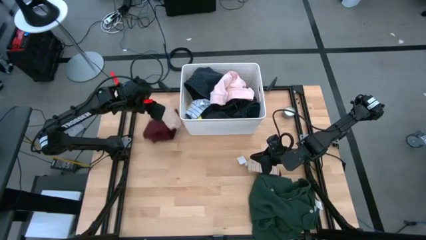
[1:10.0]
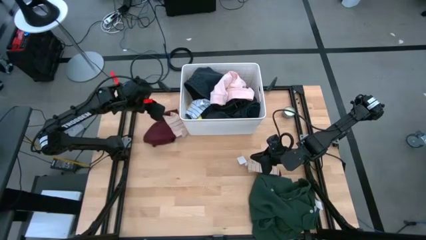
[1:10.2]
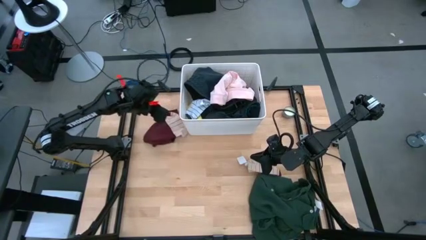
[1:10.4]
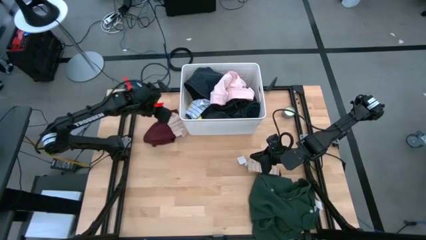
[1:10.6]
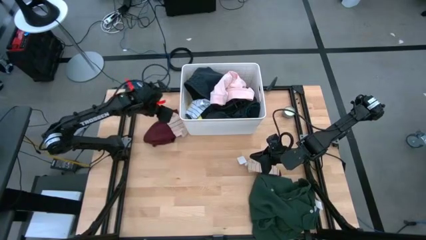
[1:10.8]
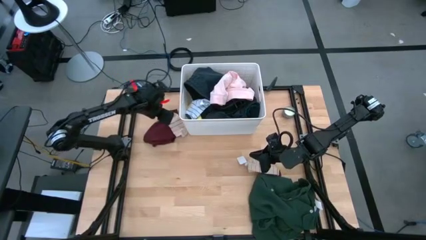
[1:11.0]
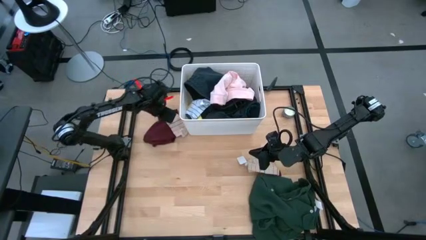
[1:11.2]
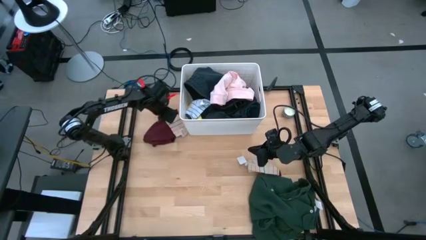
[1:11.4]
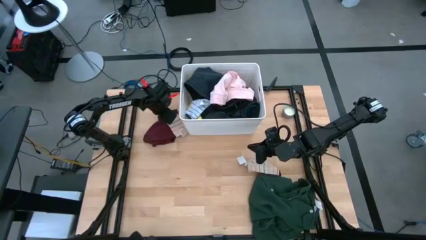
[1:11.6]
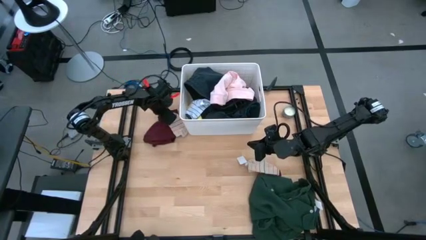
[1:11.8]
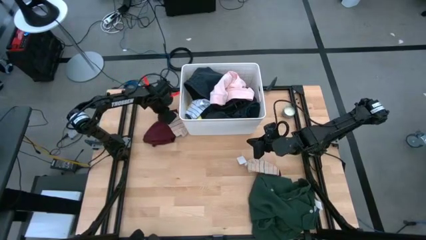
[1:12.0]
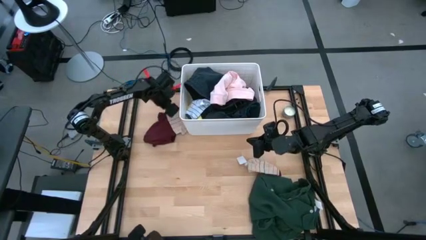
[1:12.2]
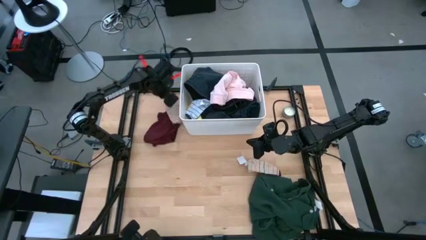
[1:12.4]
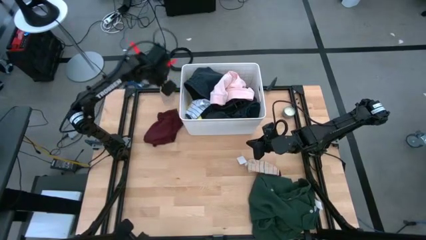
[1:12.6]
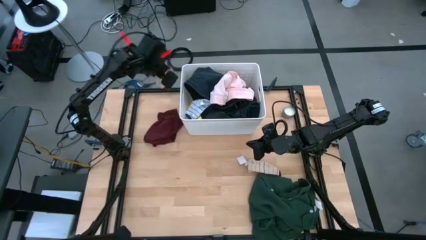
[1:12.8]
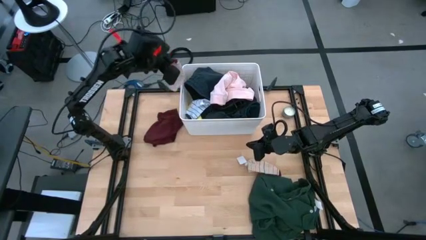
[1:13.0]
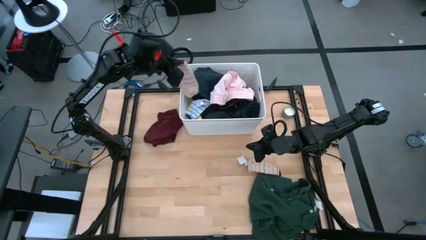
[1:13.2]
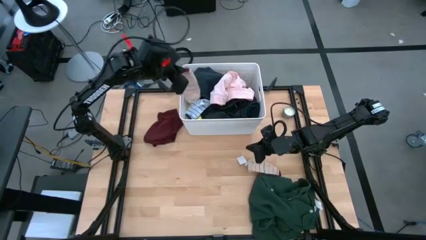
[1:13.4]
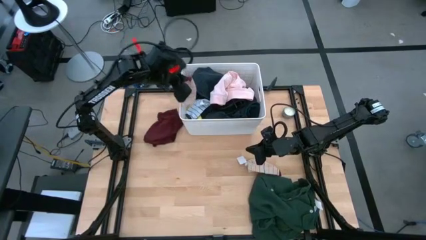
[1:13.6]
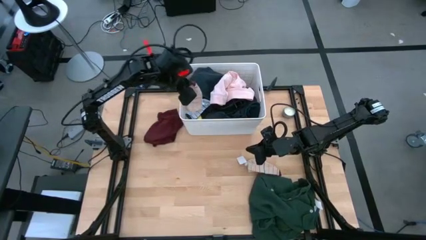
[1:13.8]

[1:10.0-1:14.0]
Task: Sort clothes
Put the left pink striped sock into the white bin

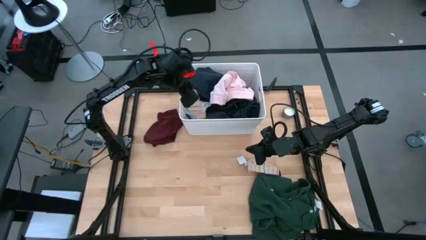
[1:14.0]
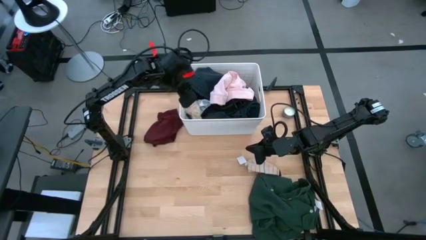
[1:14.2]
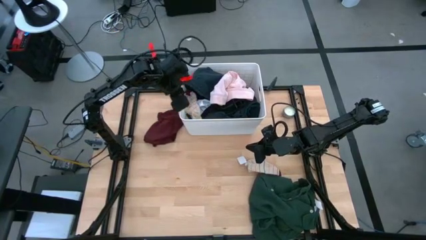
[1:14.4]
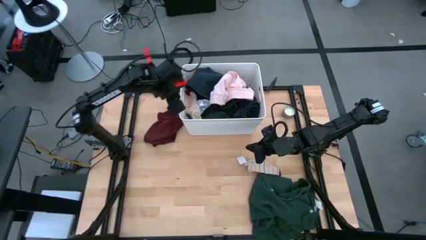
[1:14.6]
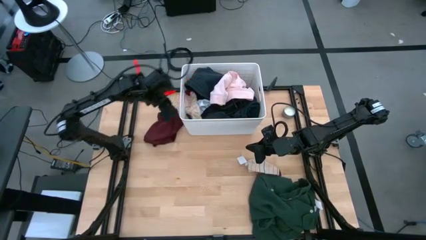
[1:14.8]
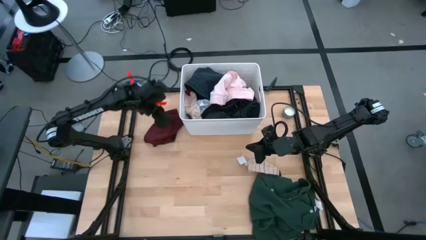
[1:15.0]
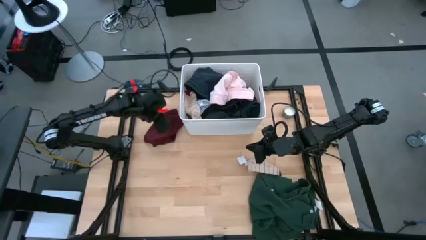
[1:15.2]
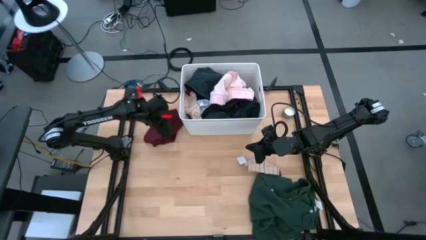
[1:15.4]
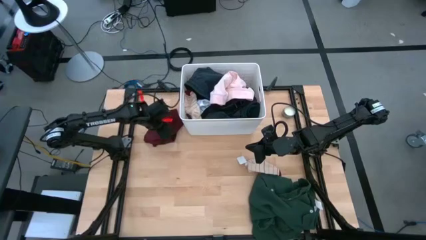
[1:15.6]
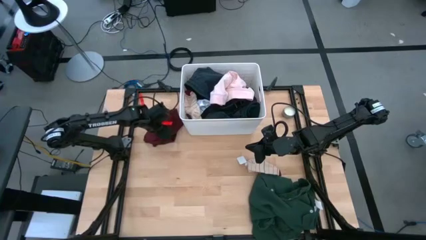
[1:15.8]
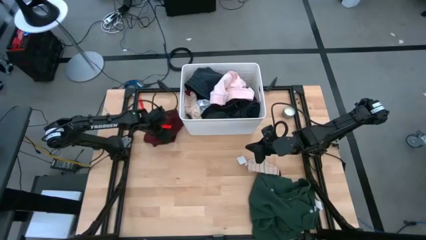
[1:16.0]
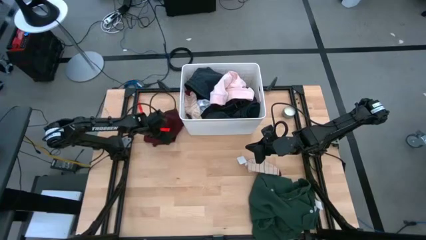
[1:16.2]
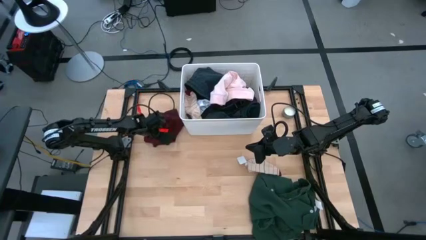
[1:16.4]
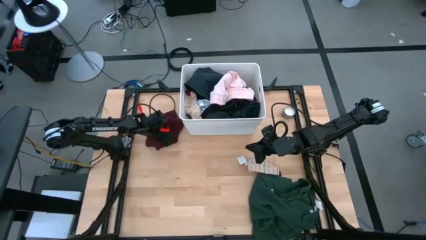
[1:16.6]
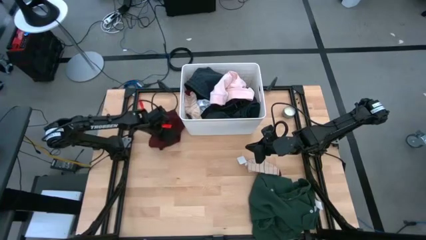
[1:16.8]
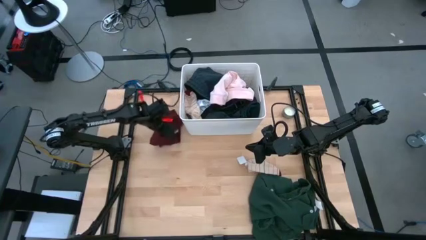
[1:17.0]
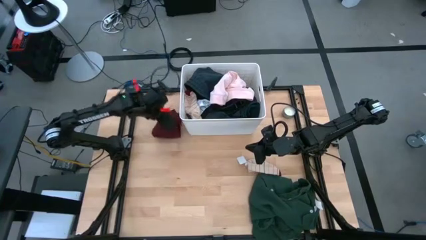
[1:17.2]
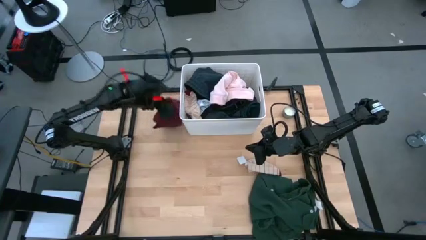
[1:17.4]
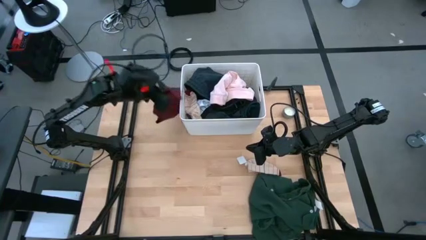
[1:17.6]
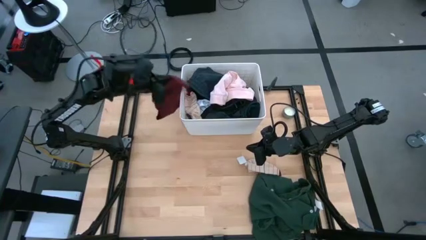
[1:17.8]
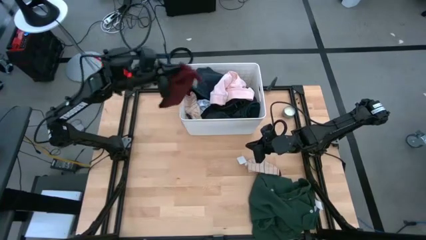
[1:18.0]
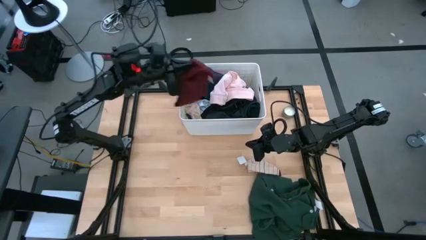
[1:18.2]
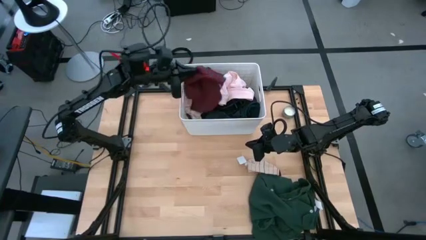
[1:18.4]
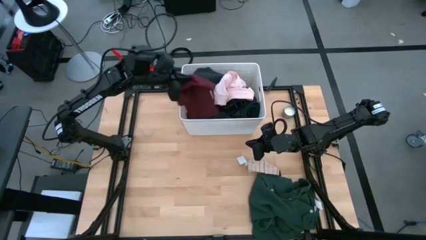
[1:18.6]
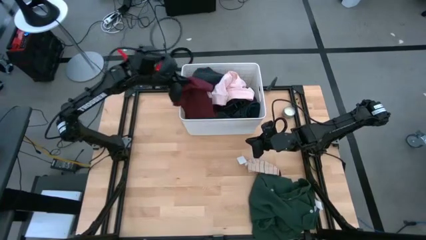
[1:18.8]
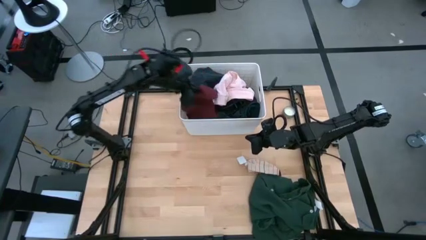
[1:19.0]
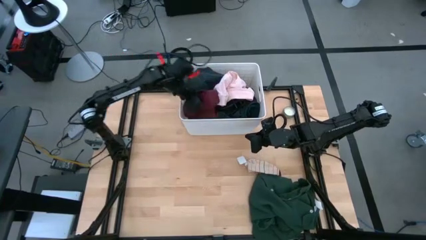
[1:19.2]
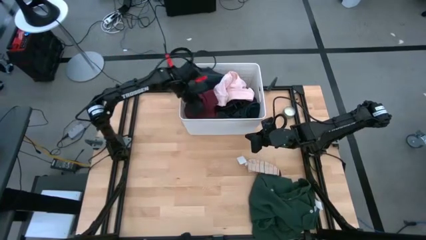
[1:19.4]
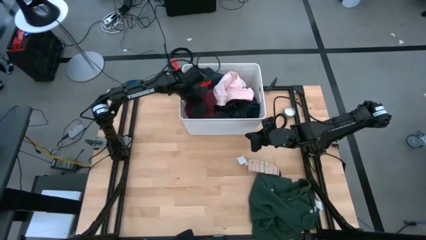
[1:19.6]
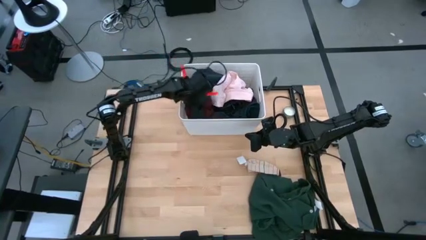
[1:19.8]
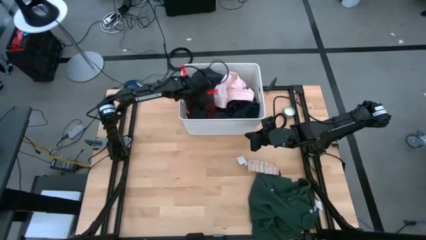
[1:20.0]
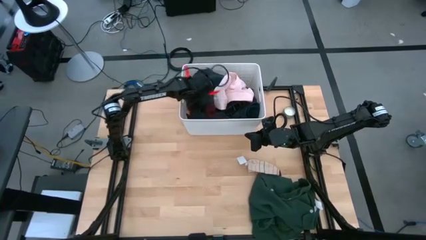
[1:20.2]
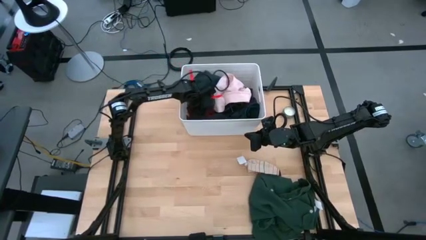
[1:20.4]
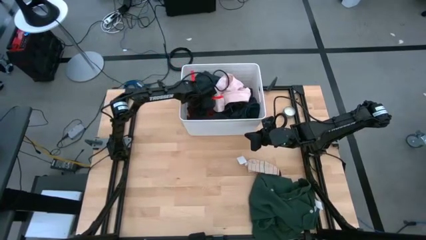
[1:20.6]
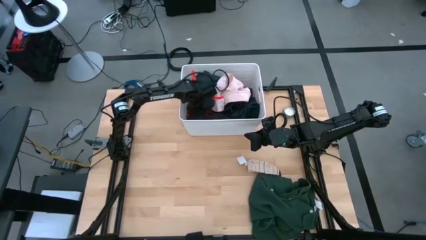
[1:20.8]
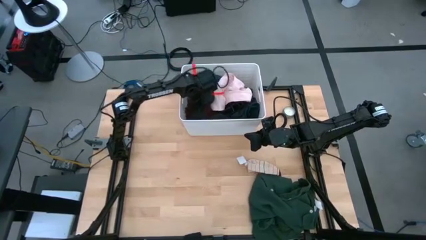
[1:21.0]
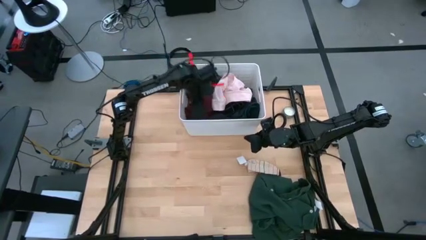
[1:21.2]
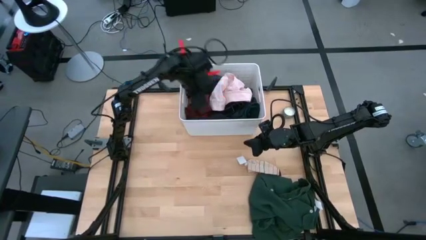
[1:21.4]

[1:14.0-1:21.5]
Put the dark red underwear into the white bin

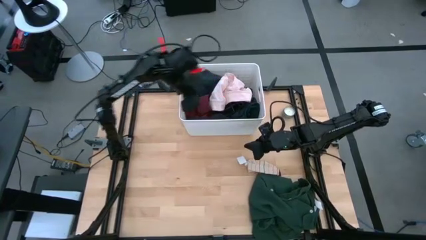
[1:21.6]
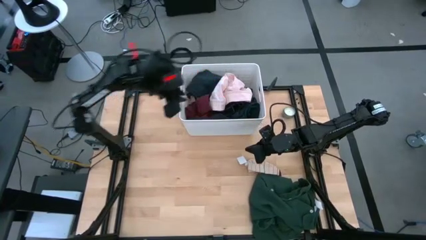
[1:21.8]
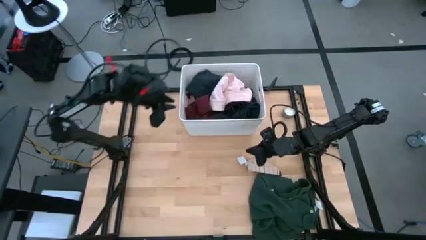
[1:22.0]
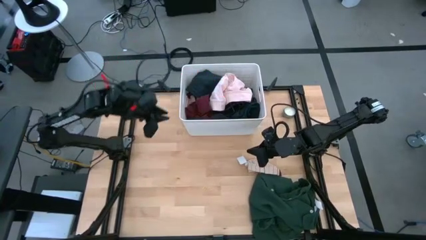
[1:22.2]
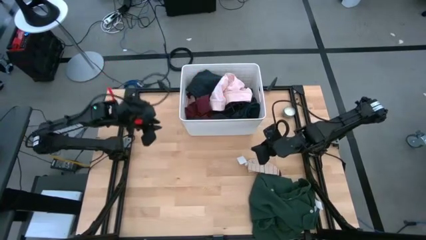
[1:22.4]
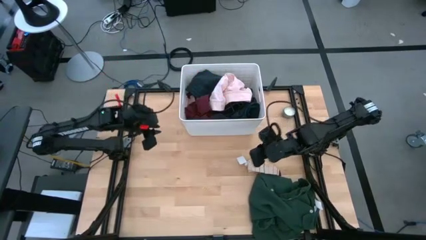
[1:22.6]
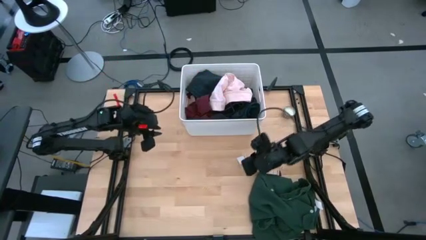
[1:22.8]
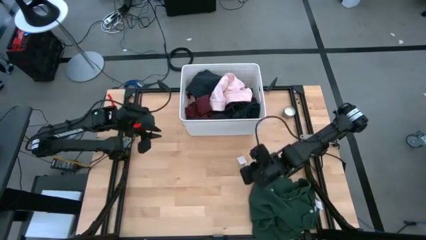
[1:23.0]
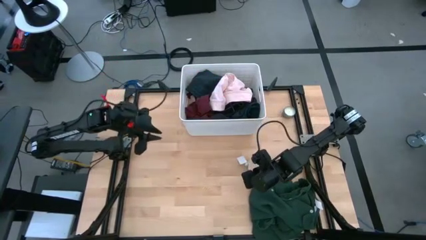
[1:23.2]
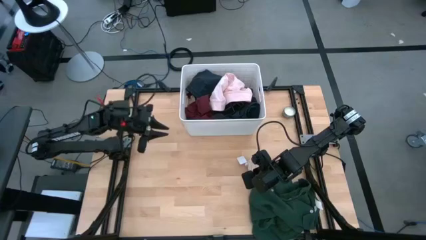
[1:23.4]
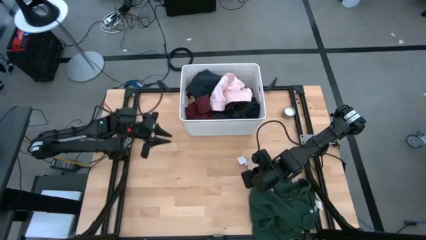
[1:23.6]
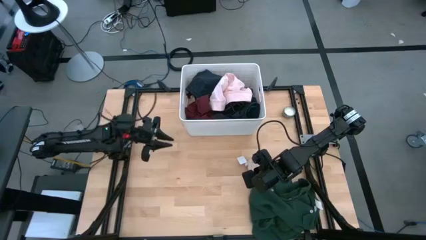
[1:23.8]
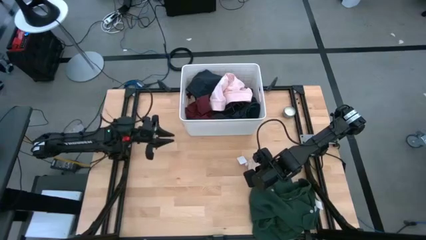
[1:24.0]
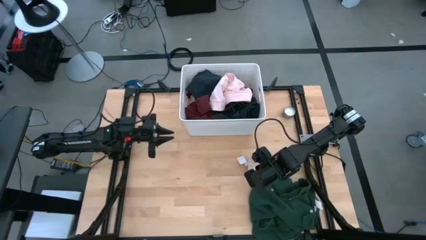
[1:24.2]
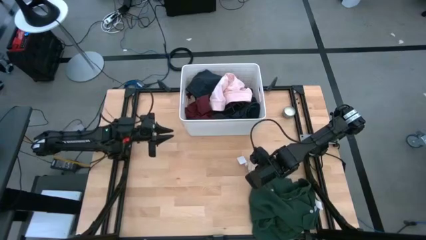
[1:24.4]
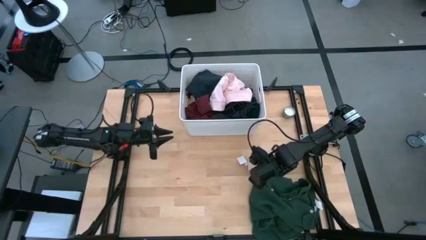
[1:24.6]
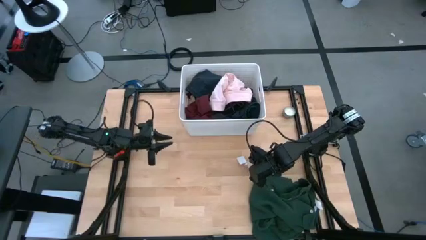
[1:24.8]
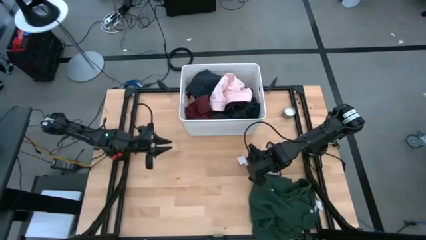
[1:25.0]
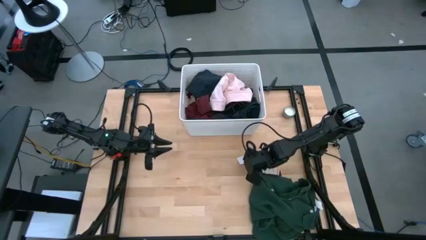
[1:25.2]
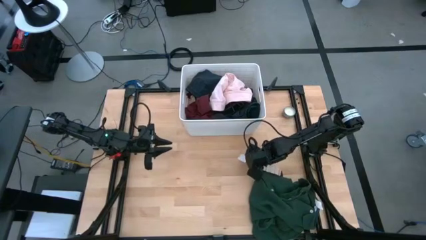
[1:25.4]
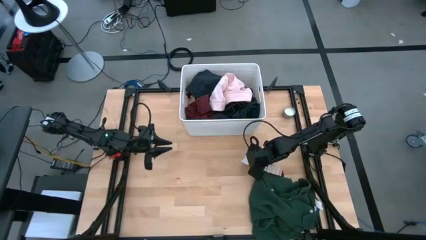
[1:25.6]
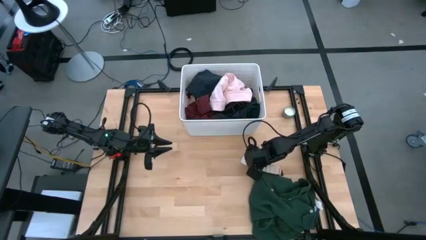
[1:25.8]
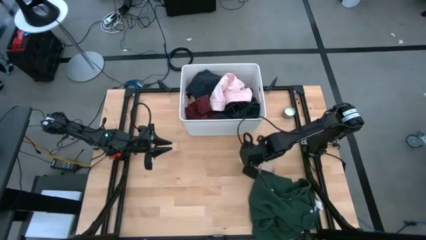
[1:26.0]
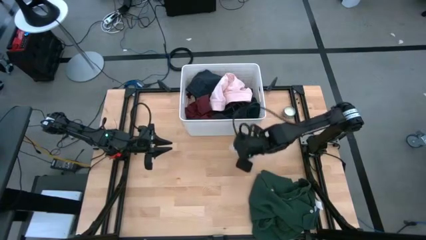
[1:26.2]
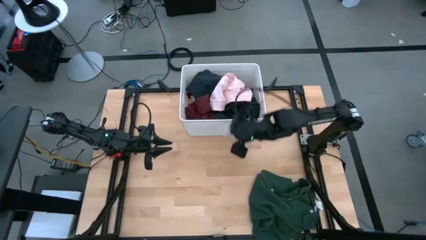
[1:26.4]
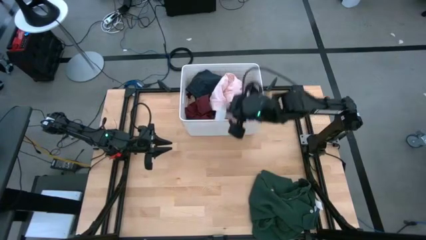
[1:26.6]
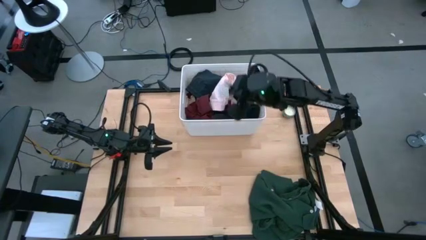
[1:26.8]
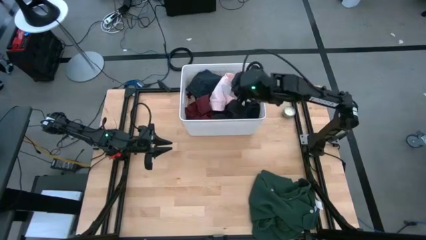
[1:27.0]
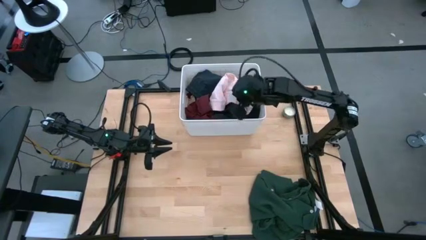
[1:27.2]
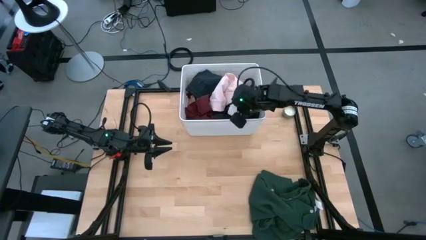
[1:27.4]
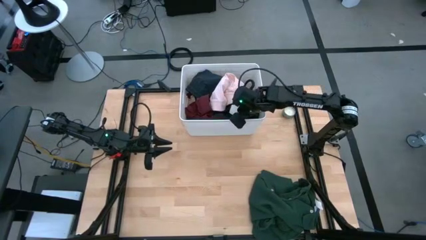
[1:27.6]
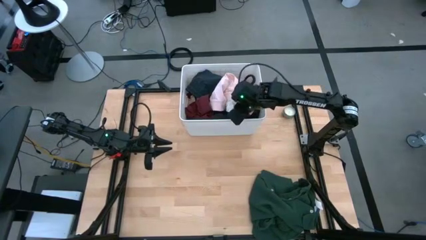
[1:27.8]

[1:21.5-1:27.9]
Put the pink striped sock into the white bin
